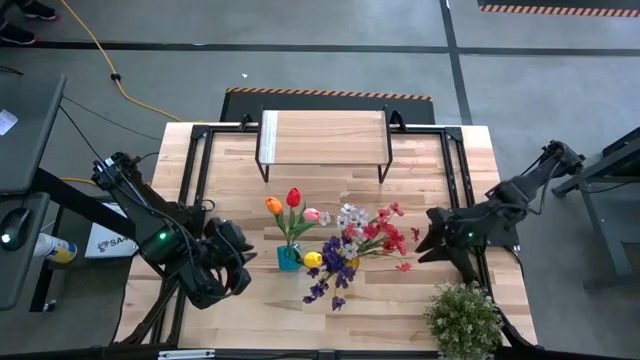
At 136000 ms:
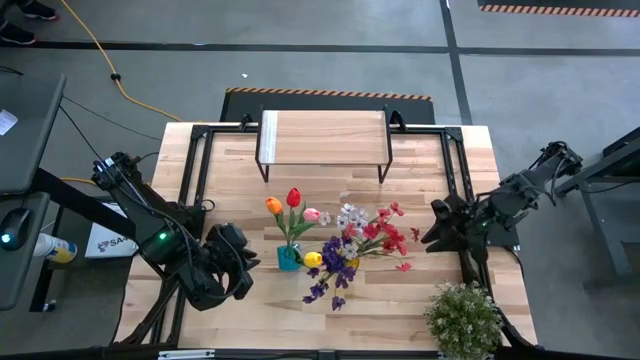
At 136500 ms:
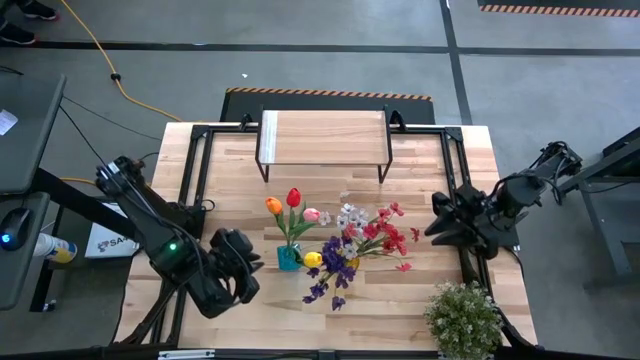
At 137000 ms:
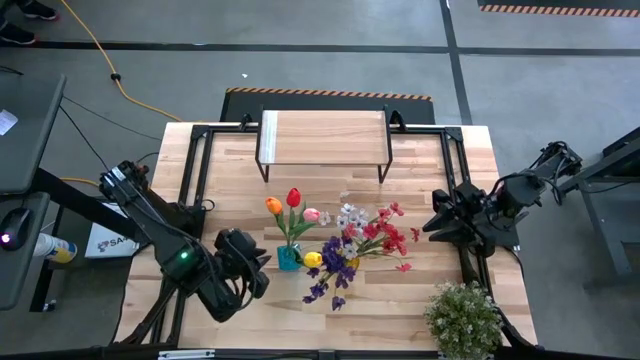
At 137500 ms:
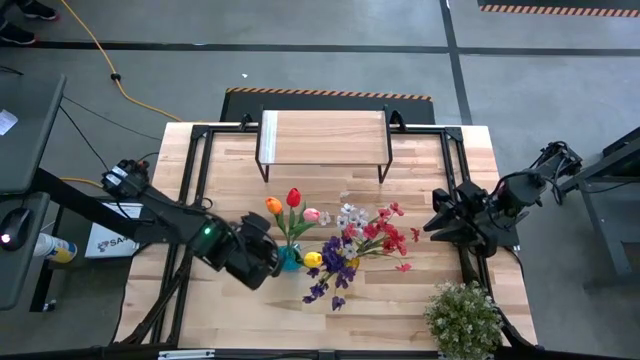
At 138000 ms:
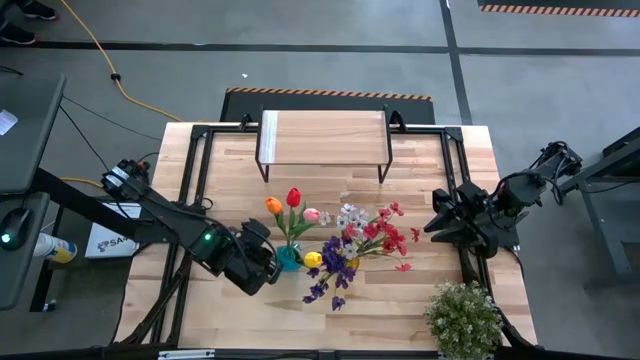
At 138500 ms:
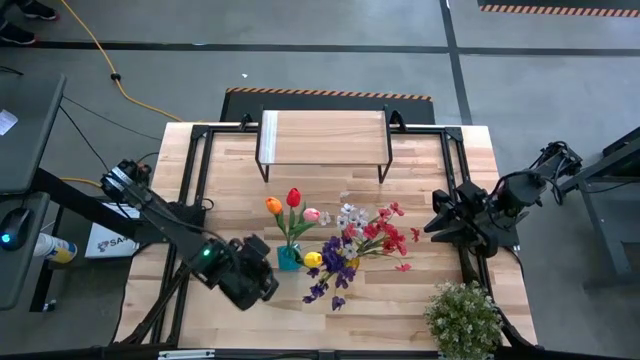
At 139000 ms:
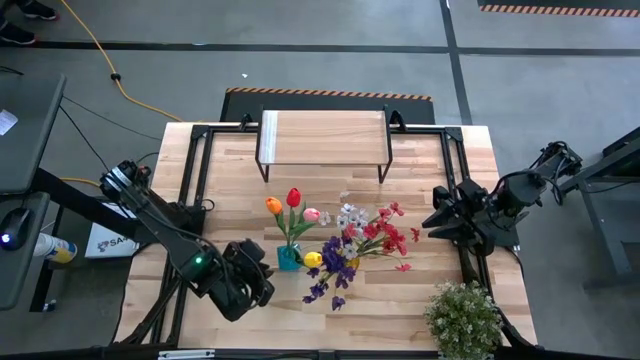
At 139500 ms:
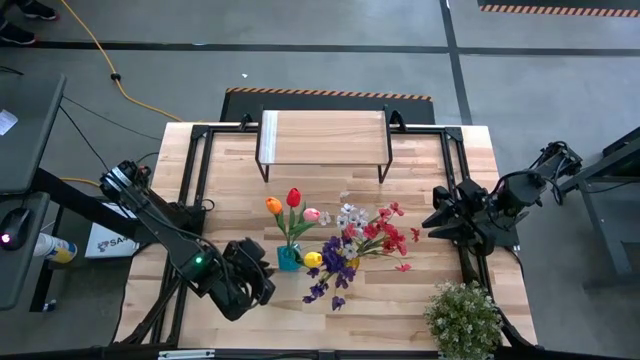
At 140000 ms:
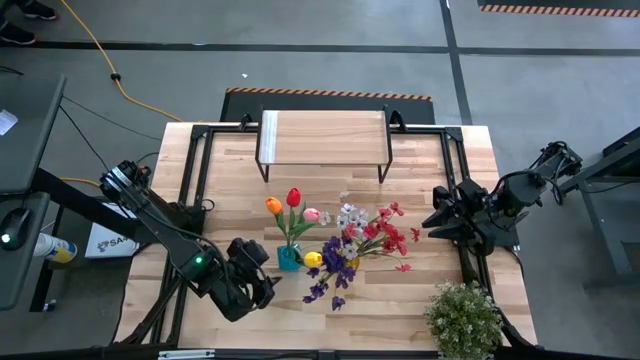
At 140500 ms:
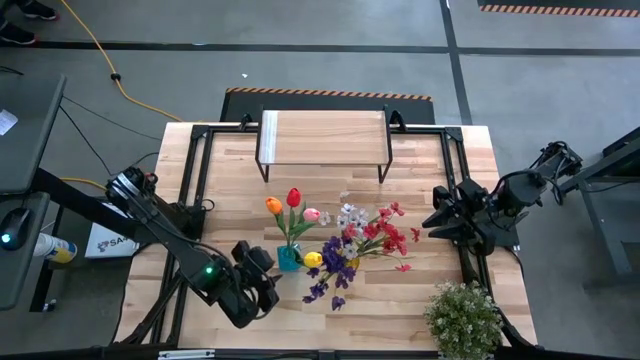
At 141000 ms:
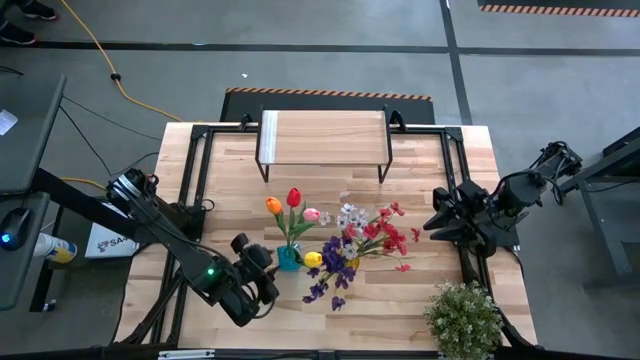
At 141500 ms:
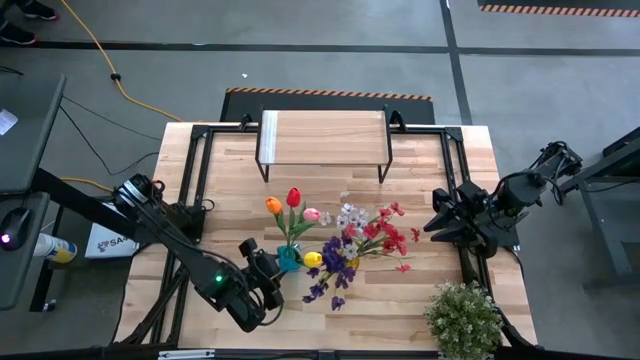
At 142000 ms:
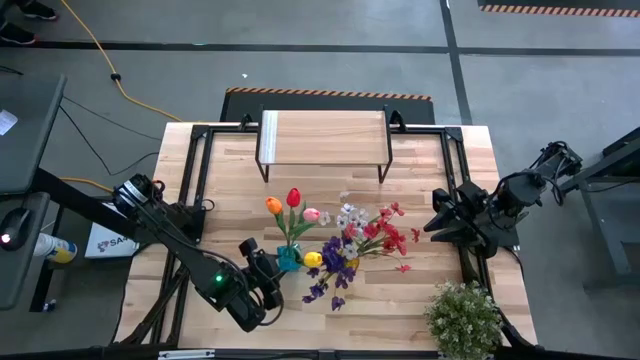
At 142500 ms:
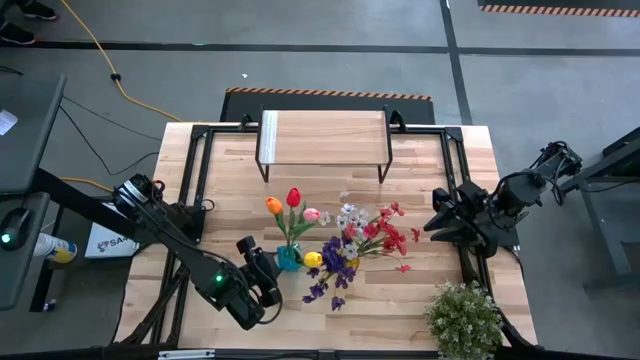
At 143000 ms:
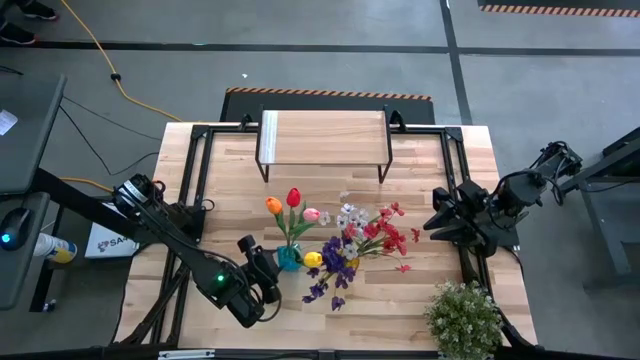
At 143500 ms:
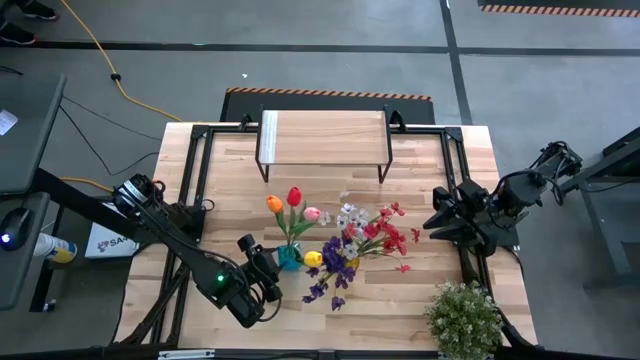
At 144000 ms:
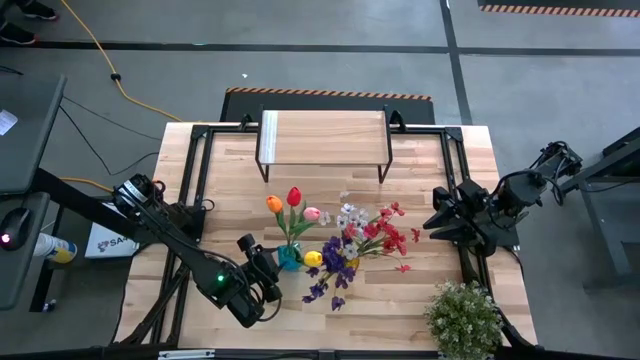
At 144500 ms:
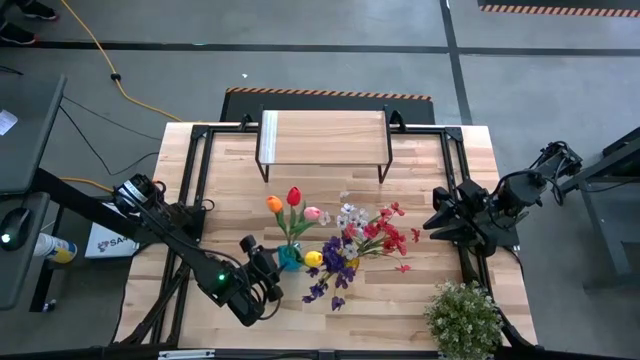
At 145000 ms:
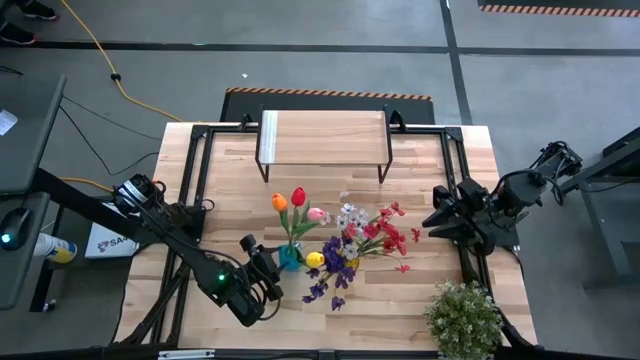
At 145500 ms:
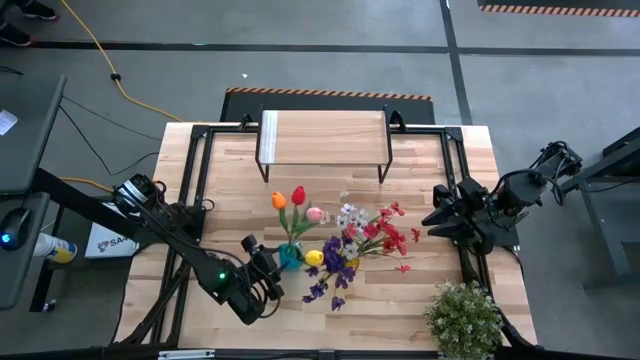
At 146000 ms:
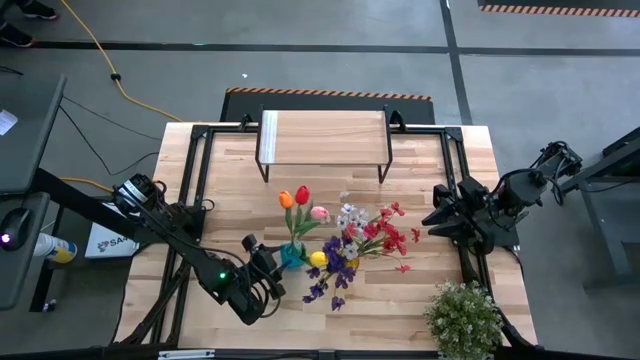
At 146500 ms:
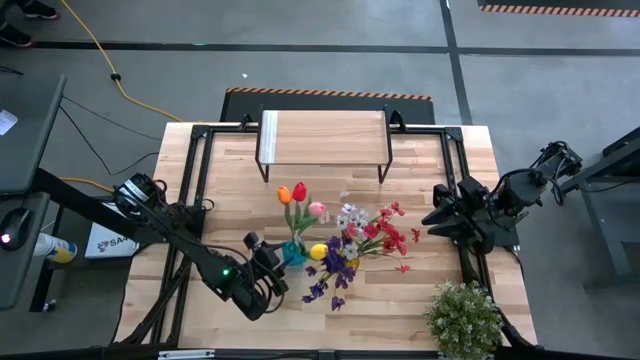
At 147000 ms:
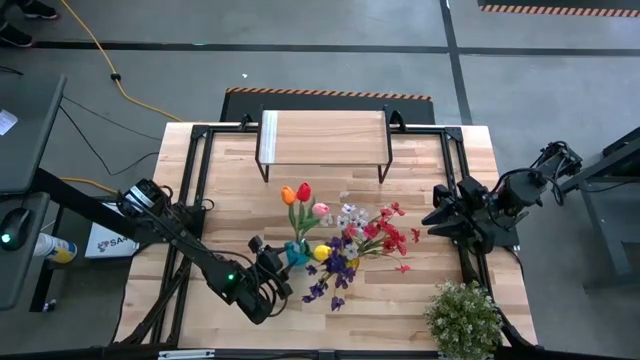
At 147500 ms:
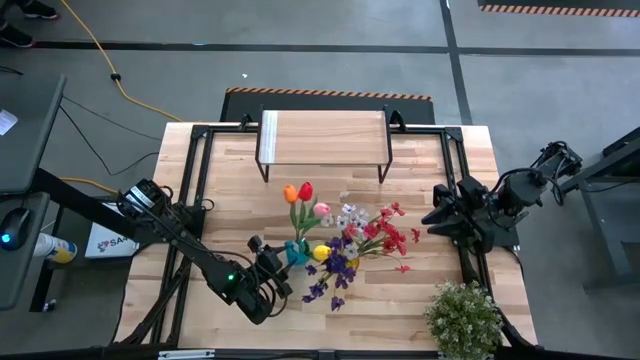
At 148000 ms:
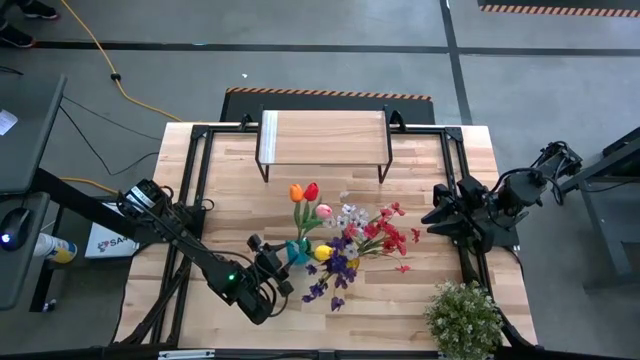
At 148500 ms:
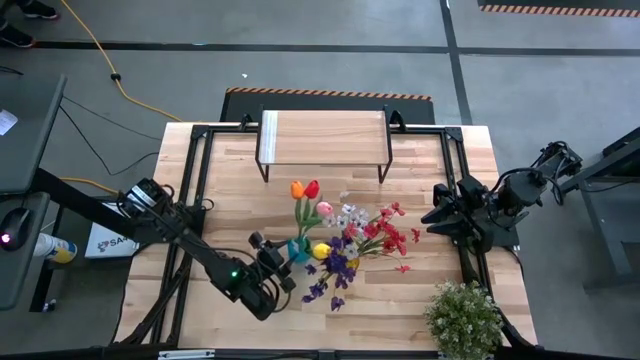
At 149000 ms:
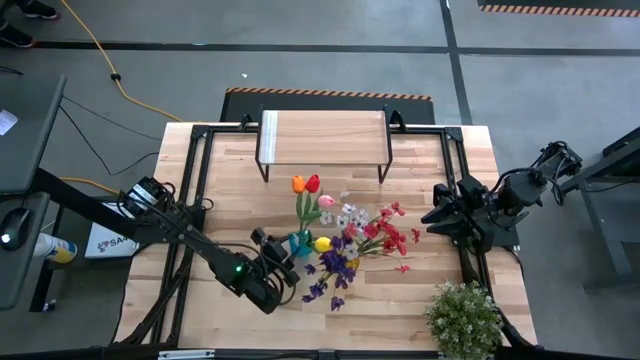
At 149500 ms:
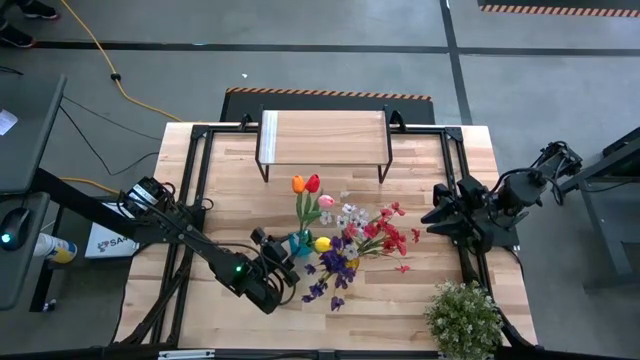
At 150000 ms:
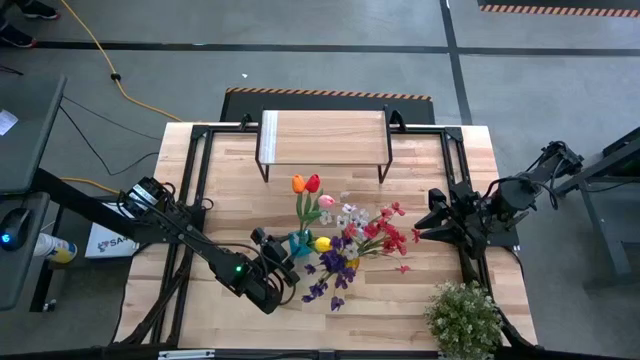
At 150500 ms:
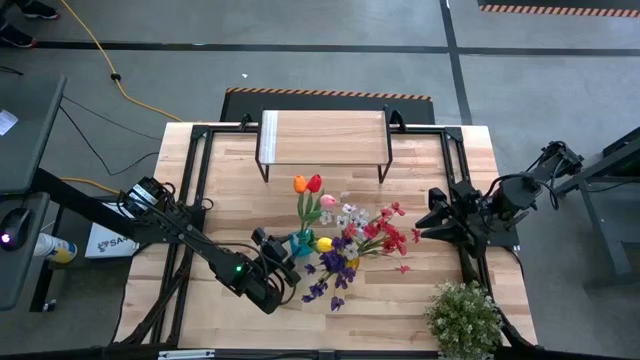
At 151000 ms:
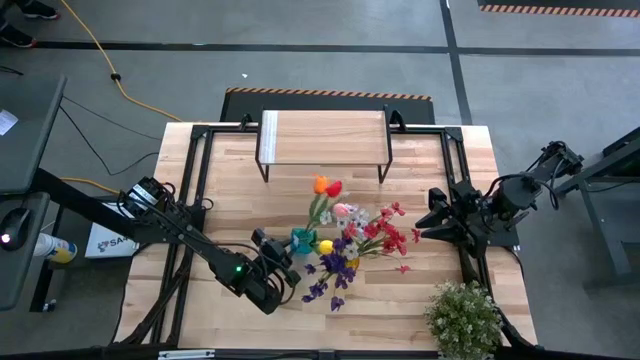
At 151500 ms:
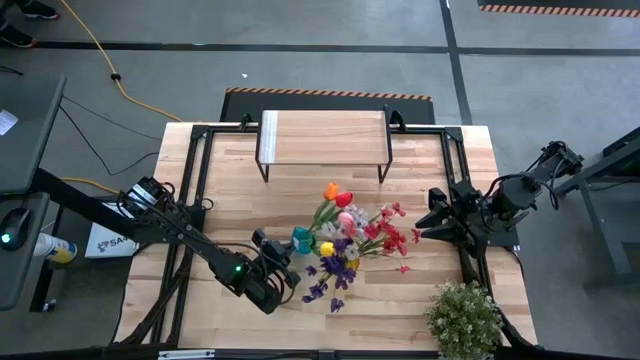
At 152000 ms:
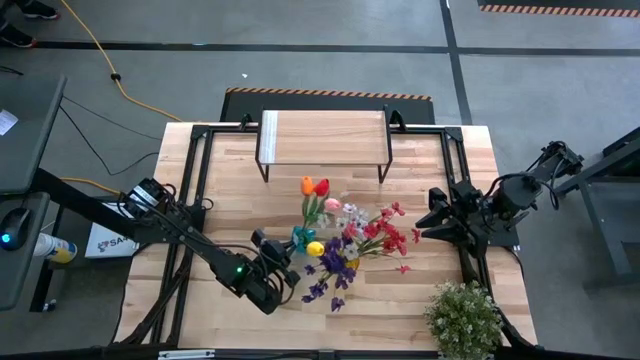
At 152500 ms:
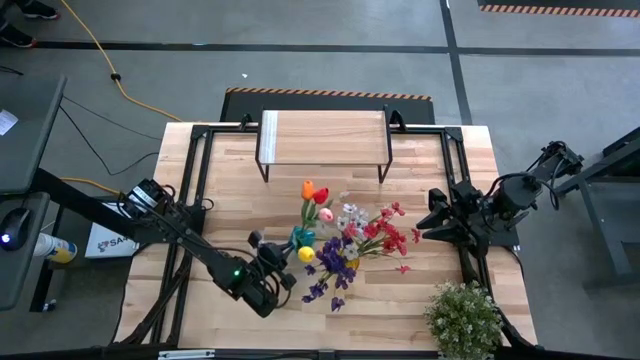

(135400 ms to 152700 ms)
Task: Pick and place flowers into a vace then onto a shelf
Put the blue flower vase on the shelf

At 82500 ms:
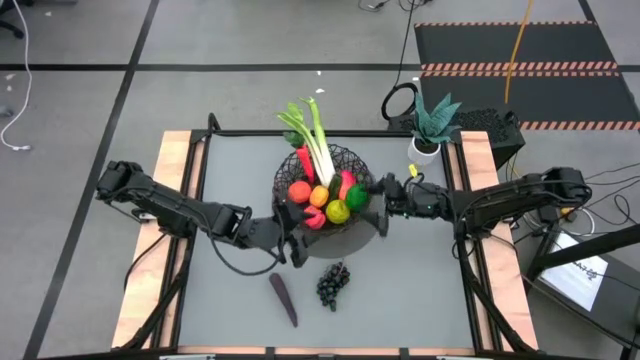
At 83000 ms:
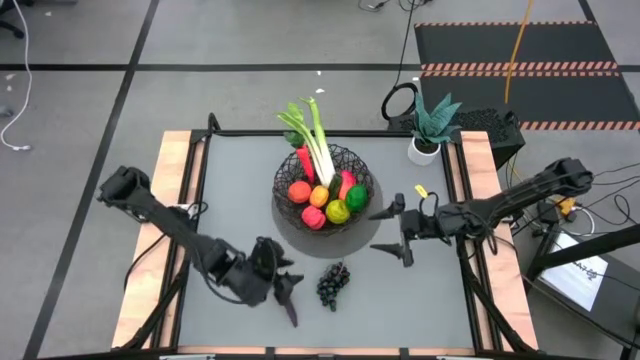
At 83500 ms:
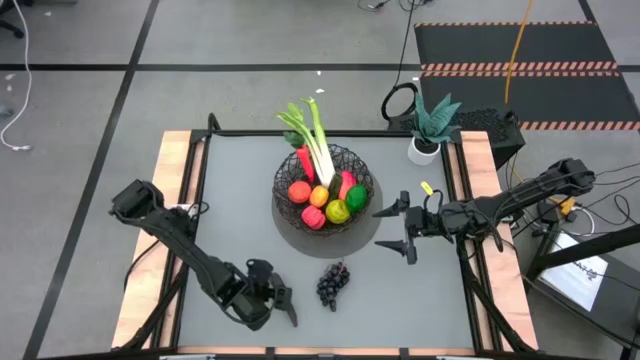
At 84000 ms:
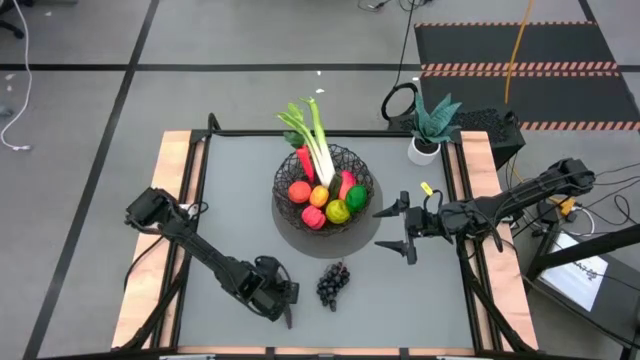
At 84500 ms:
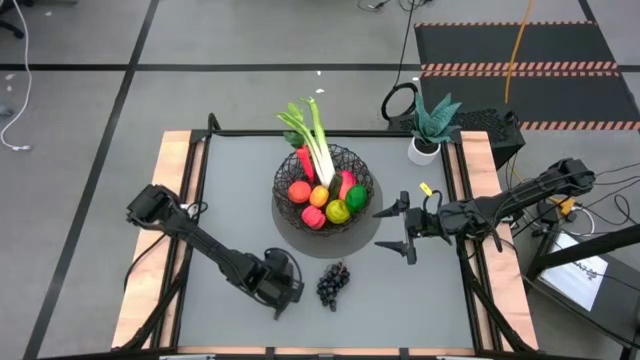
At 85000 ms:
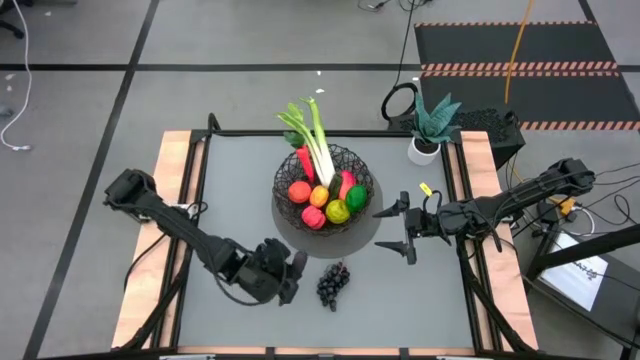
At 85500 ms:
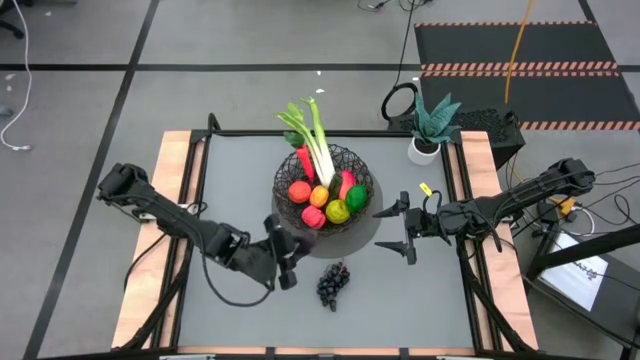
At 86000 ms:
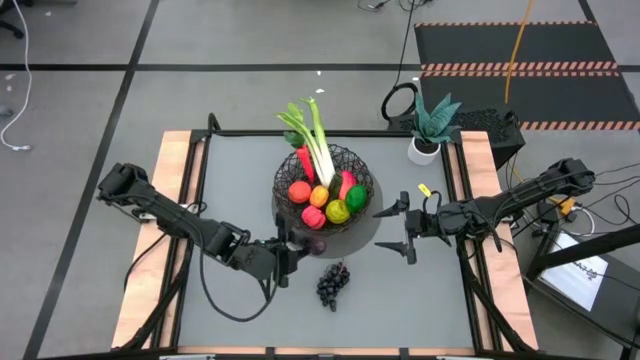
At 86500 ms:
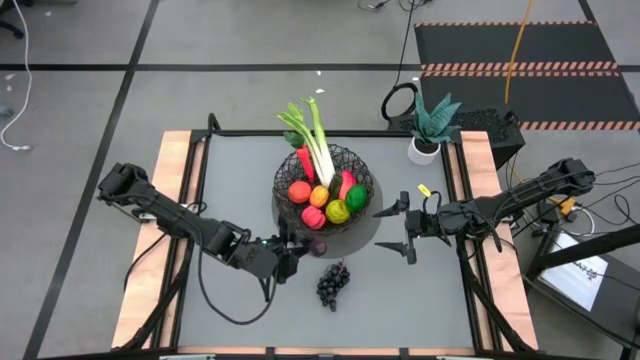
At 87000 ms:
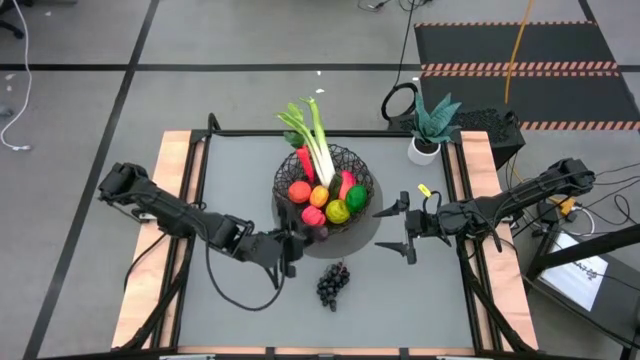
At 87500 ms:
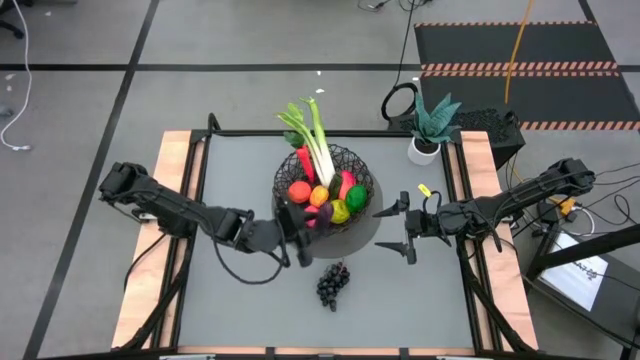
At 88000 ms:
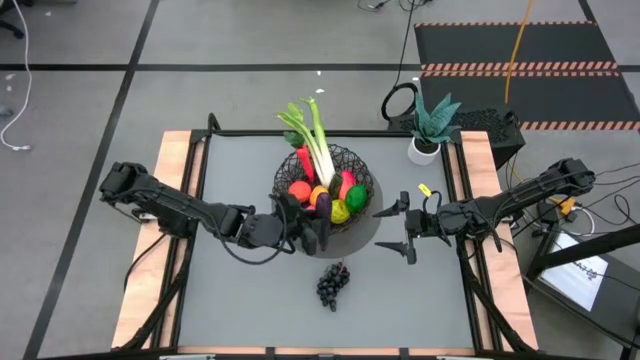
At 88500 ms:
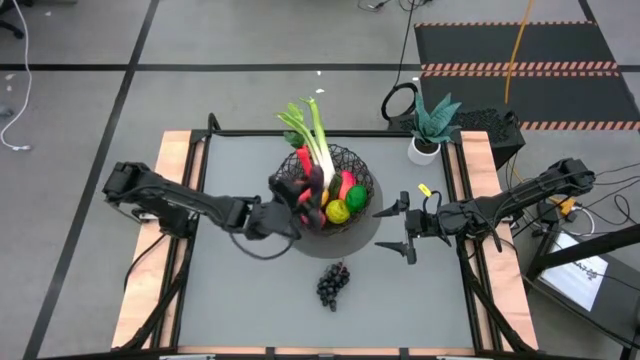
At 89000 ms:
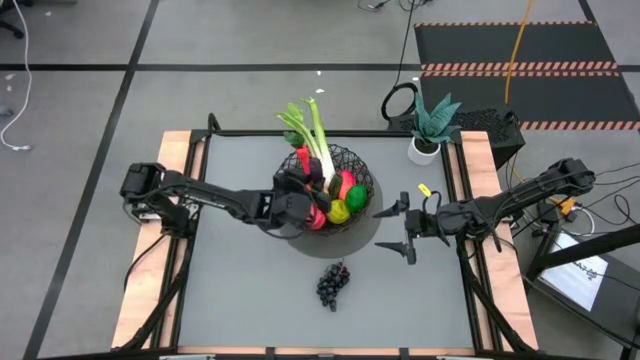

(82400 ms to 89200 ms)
Task: Build produce basket
Put the purple eggplant into the black woven basket
